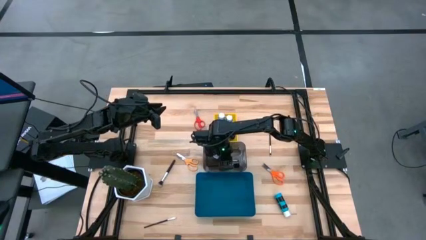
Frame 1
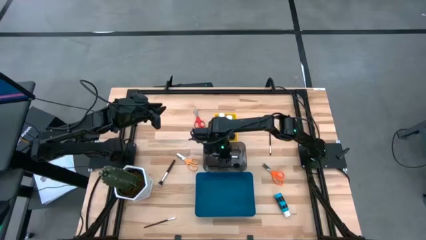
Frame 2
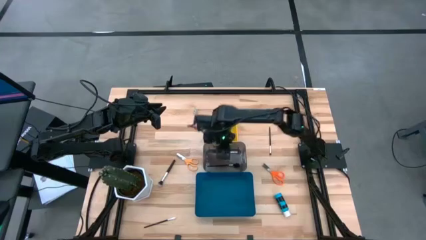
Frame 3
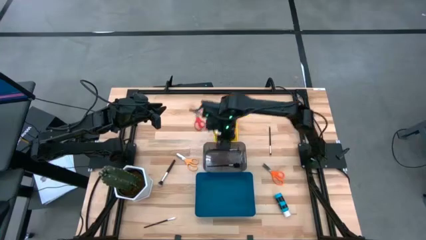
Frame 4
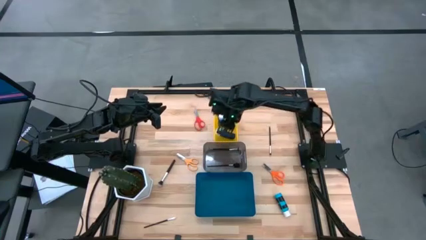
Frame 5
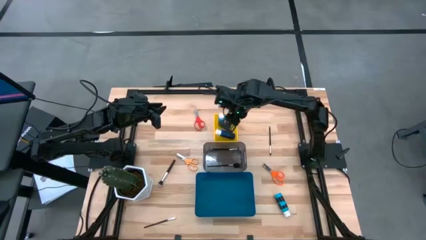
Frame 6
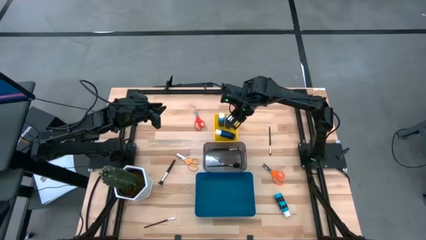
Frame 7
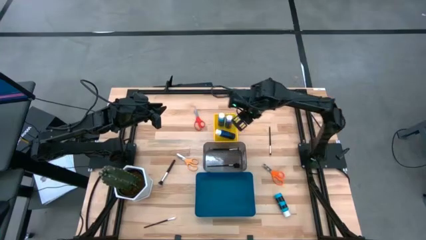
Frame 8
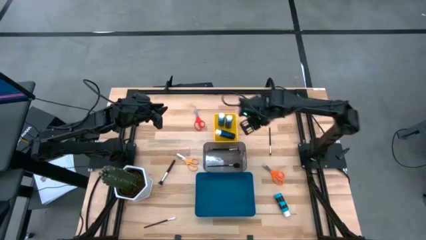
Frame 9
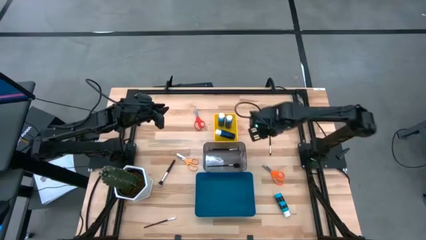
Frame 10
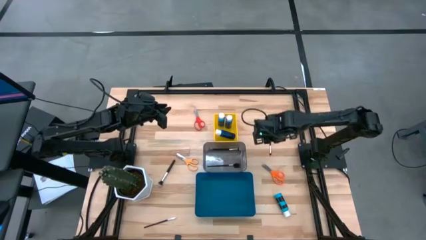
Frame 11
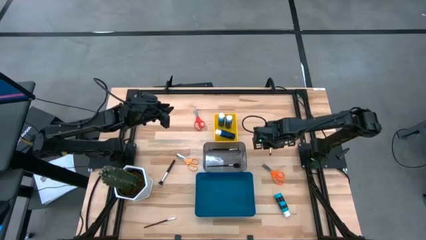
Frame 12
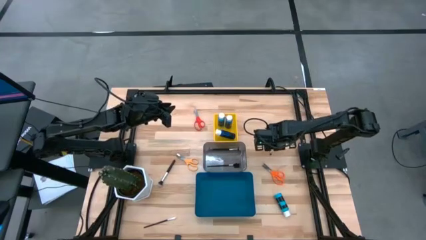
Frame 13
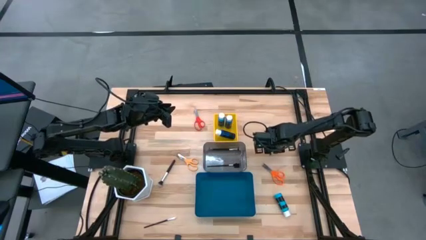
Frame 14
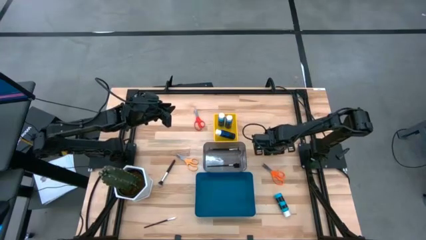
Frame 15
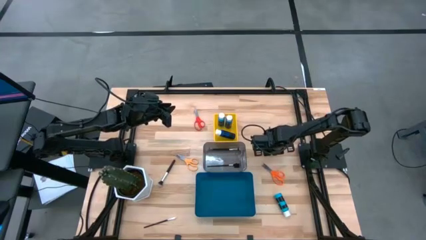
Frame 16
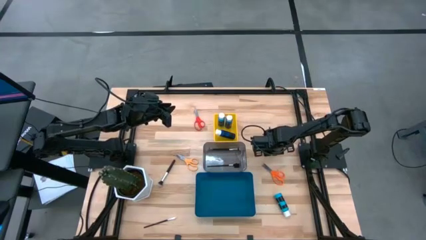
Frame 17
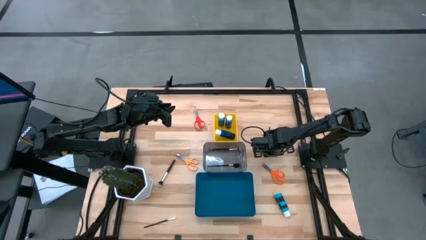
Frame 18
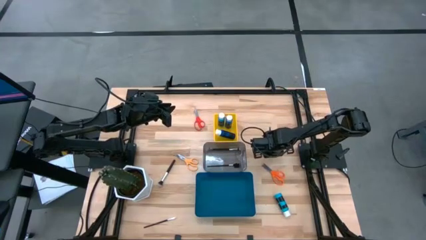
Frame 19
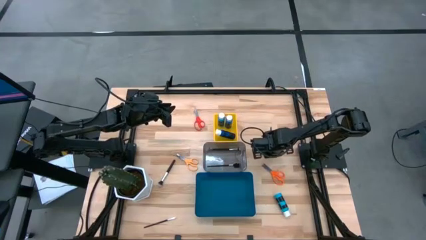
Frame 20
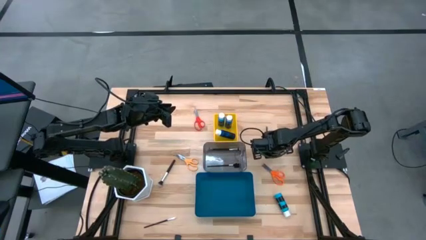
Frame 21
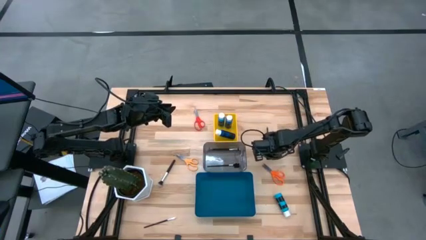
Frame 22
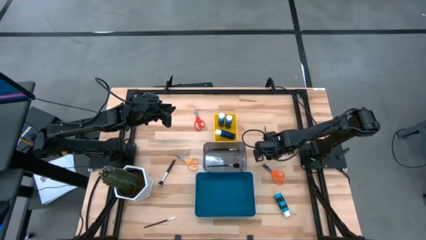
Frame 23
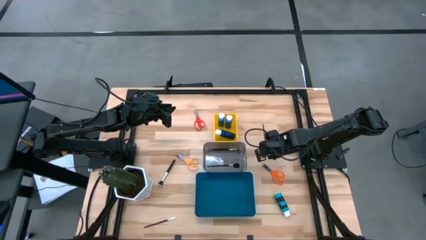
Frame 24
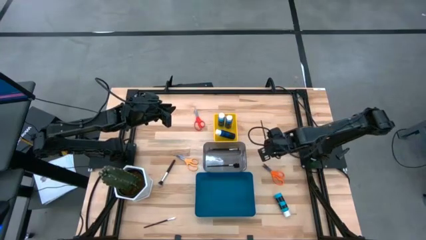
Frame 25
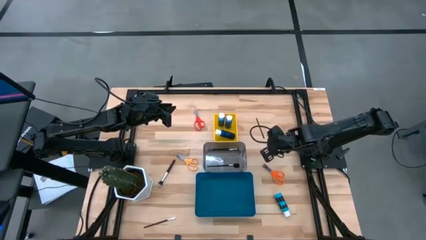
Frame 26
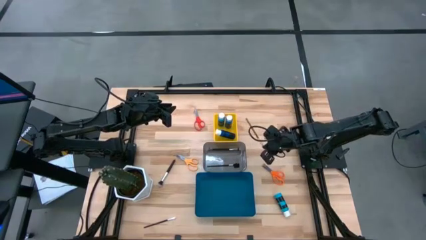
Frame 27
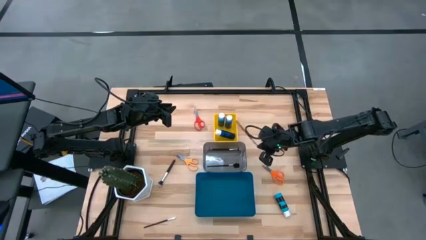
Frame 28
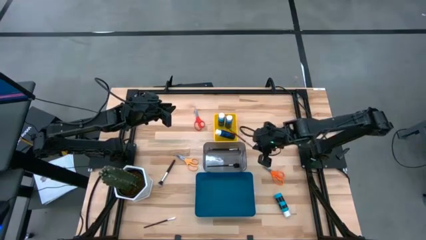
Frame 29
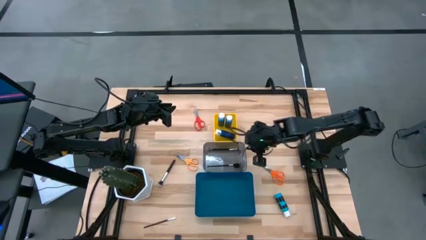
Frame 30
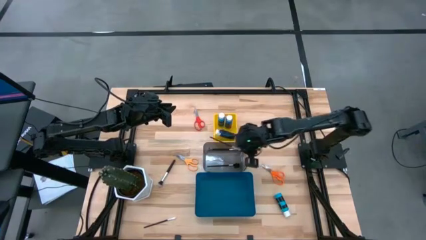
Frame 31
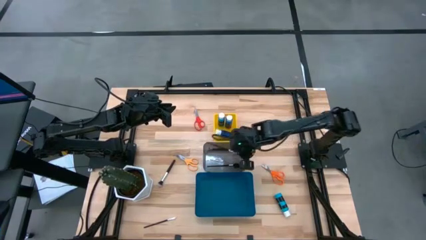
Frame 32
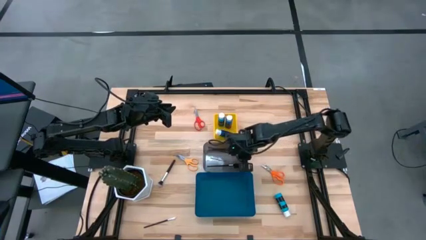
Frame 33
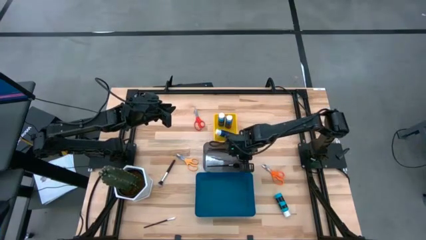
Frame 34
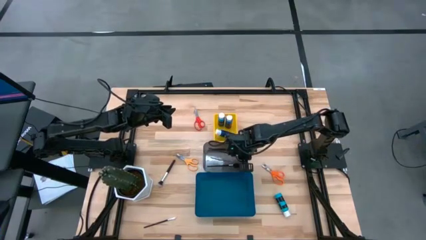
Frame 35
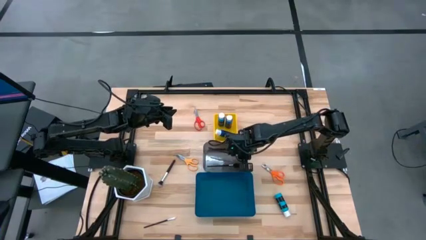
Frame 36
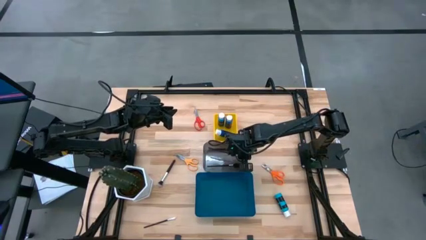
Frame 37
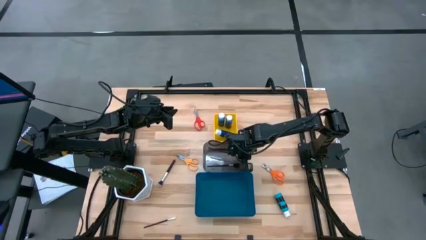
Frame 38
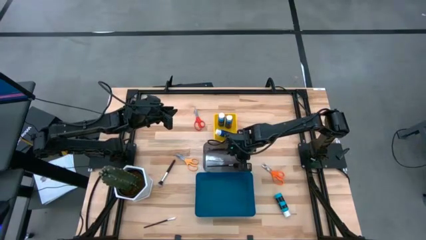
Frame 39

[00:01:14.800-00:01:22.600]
Task: Pick & Place Paint Supplies
Put the makeup brush into the black bin

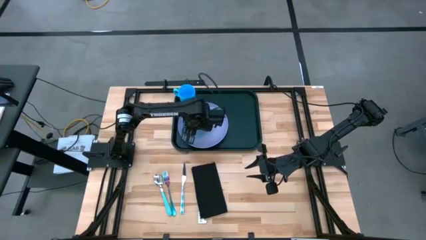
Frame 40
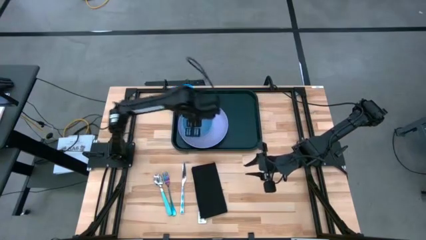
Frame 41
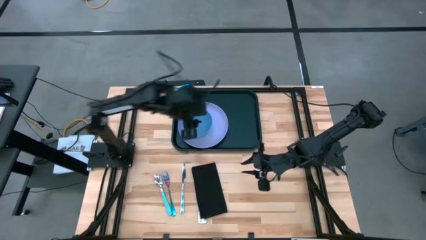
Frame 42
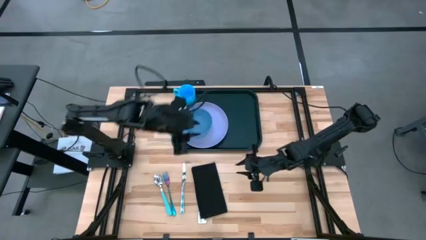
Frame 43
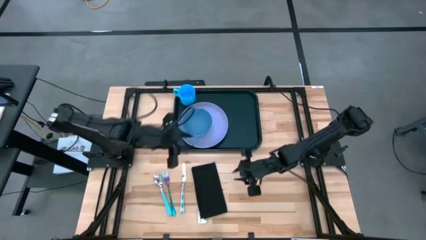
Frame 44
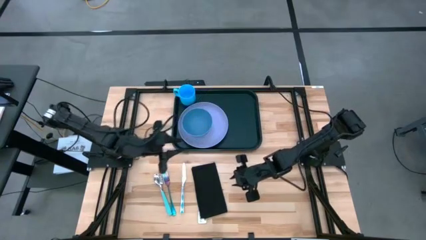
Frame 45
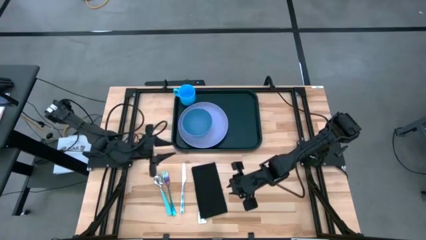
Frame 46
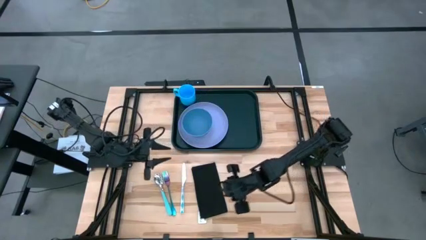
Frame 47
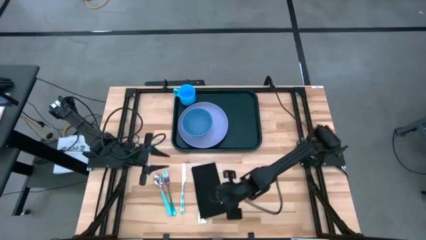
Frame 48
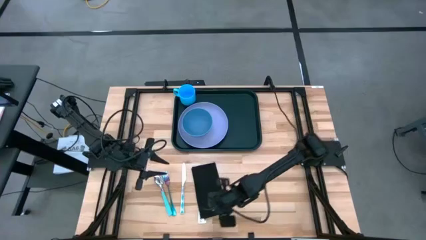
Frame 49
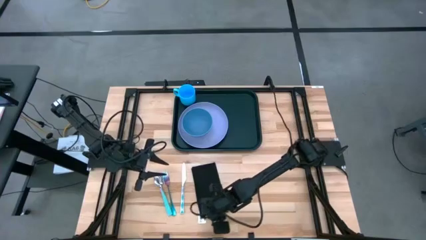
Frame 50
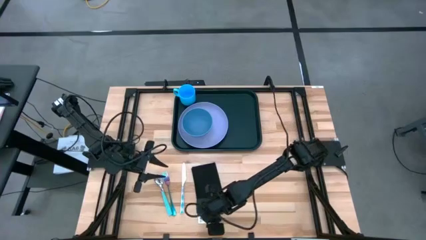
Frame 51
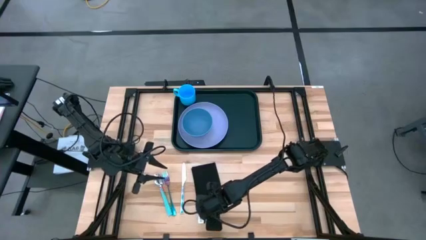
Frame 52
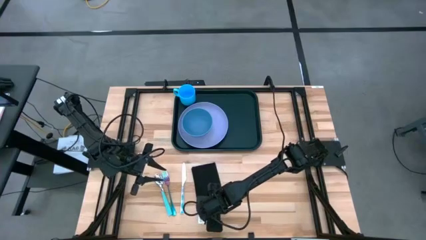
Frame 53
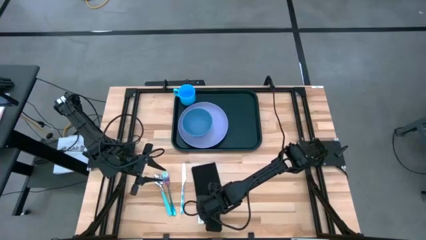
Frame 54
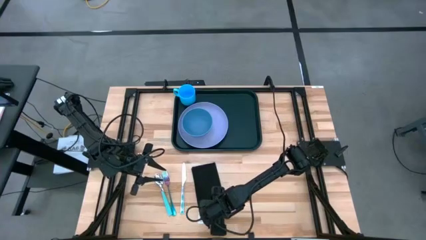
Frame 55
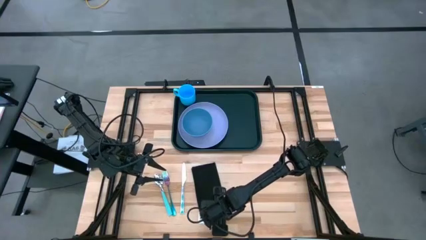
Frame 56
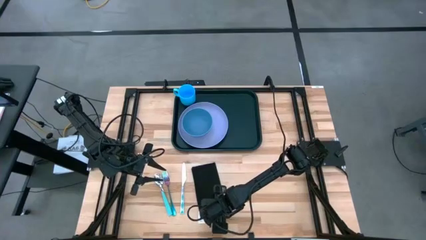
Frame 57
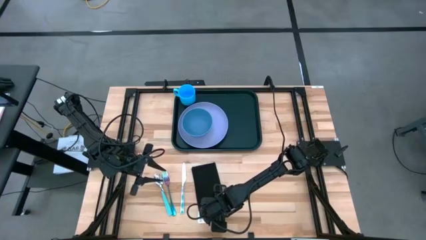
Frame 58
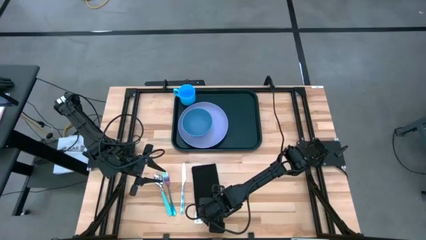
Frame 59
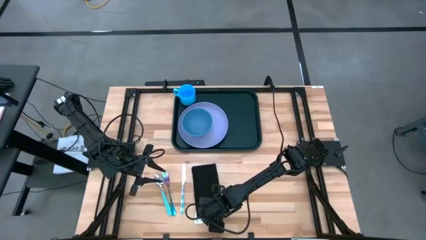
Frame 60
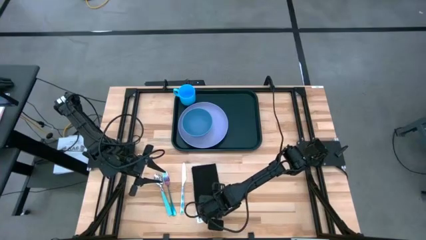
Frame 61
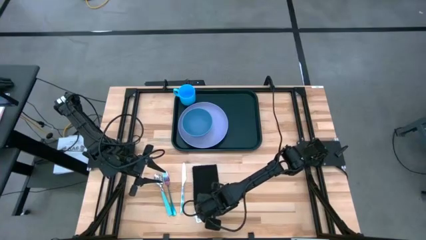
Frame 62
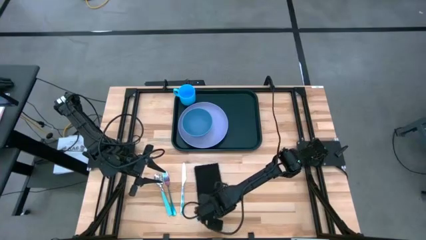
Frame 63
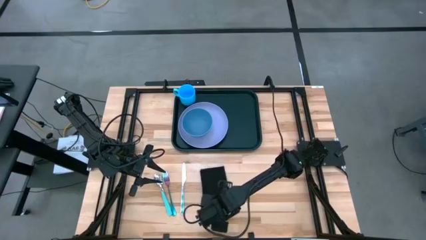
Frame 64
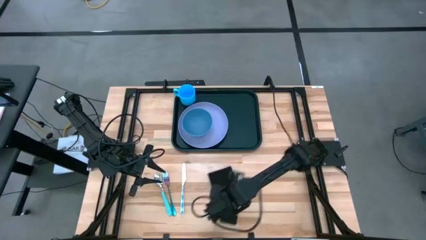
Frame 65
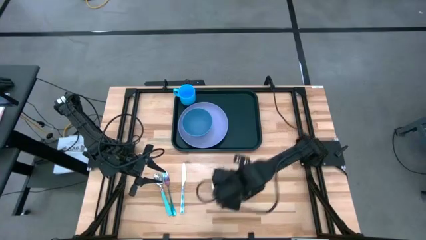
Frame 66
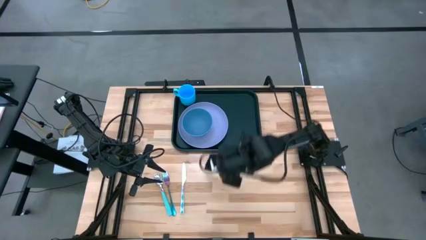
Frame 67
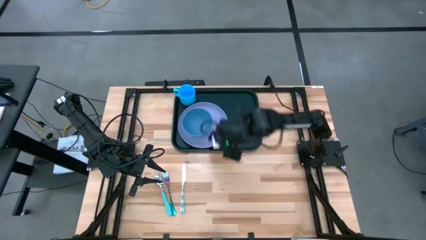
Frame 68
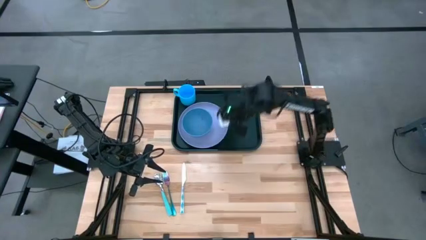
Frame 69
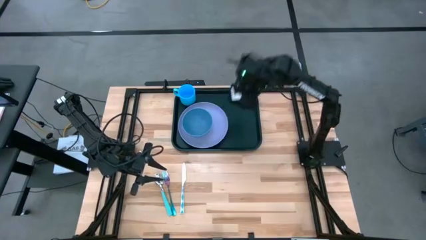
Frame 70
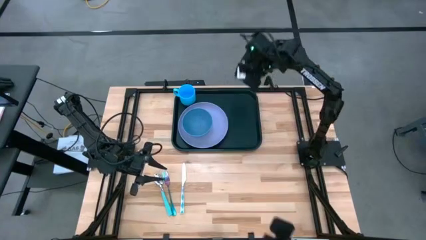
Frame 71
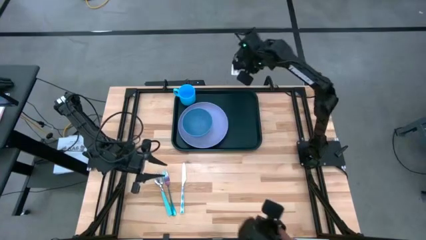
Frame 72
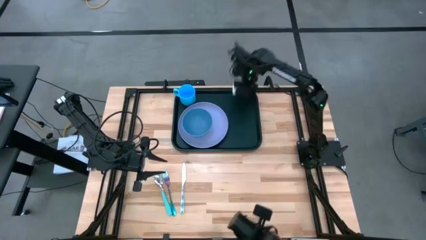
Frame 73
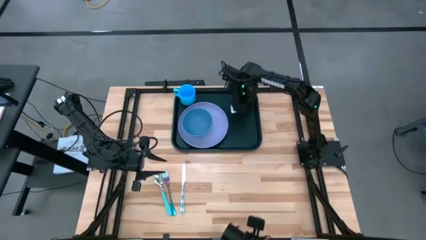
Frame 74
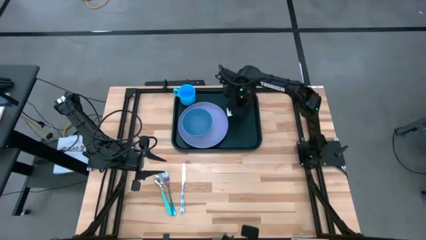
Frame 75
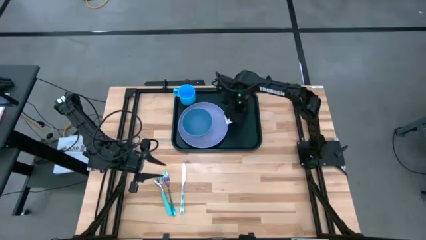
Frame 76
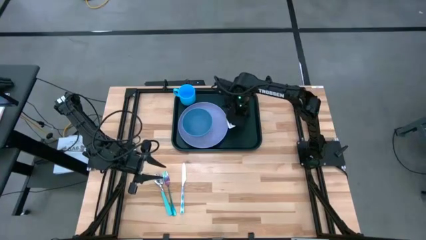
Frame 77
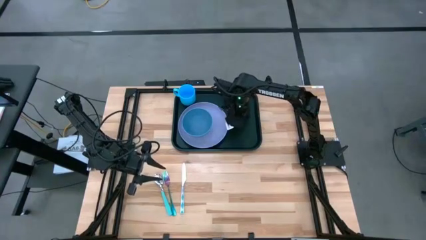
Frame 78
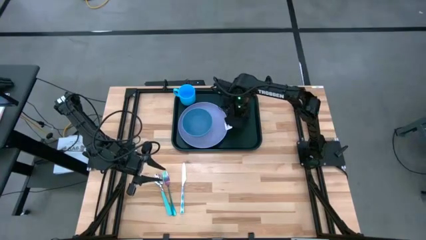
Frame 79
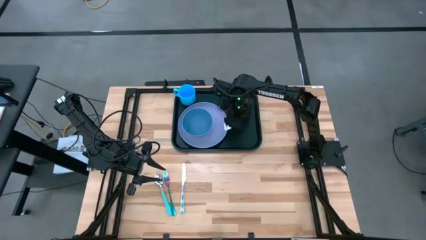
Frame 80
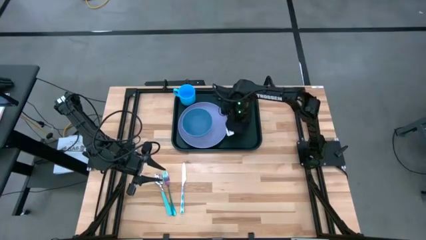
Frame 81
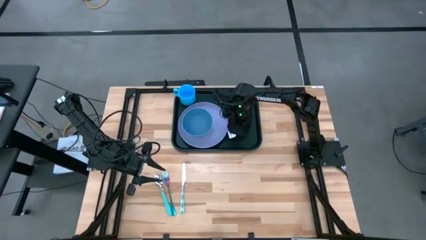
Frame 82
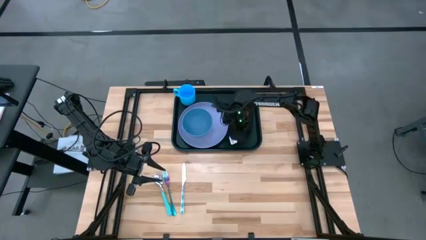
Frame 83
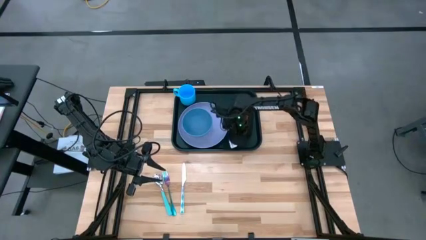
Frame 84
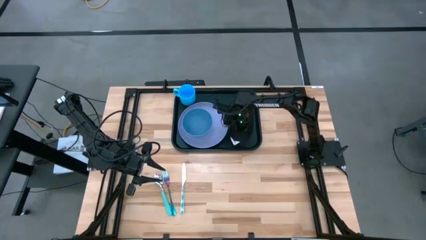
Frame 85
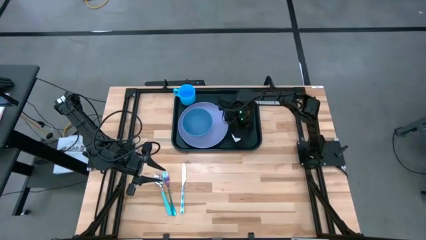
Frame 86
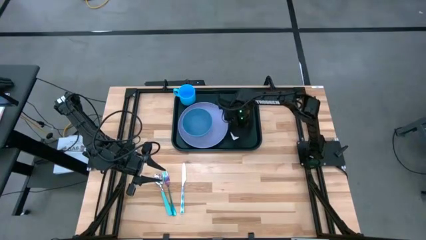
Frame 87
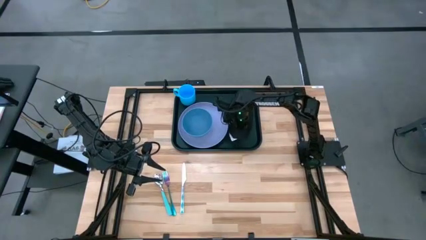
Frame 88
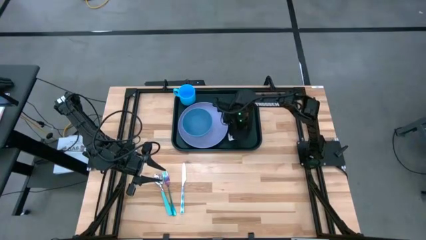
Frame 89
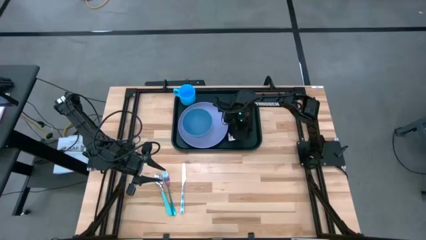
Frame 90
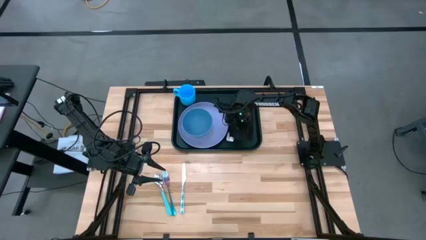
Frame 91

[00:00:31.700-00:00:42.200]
Task: Set up tray
Put the black napkin on the black tray beside the purple plate
